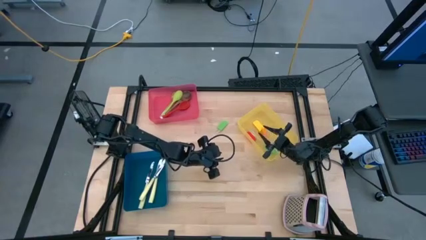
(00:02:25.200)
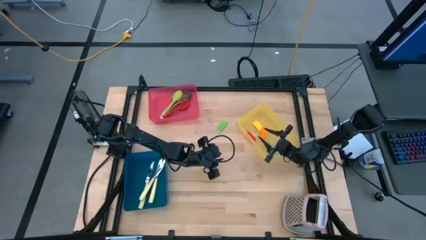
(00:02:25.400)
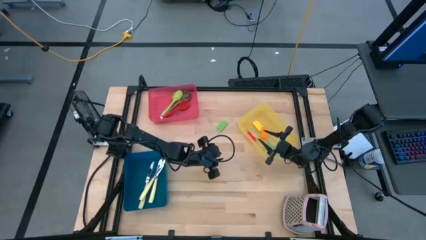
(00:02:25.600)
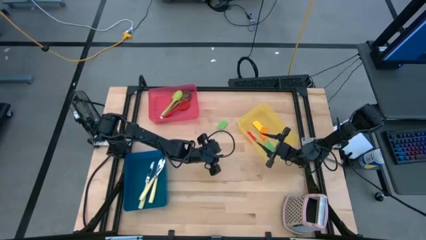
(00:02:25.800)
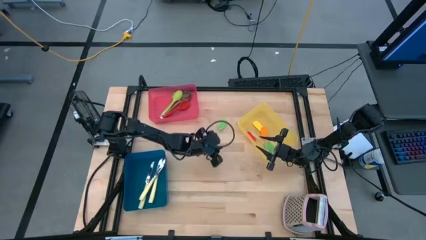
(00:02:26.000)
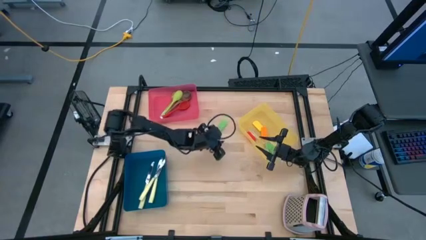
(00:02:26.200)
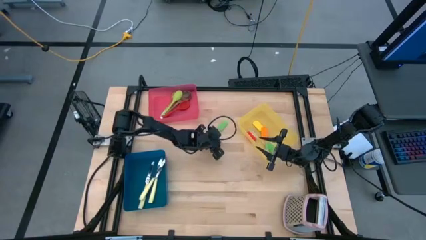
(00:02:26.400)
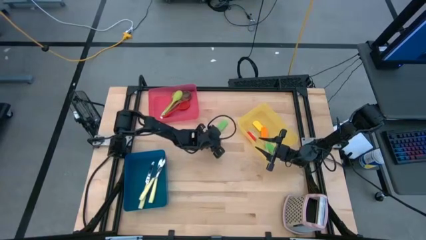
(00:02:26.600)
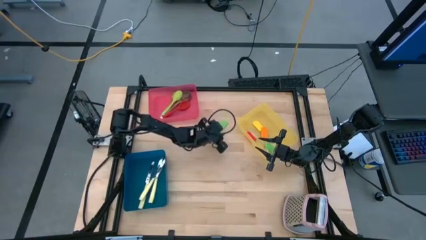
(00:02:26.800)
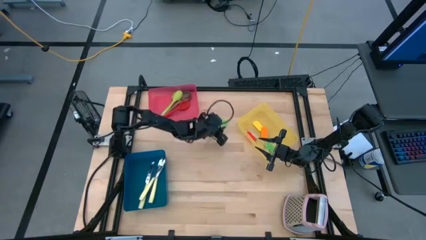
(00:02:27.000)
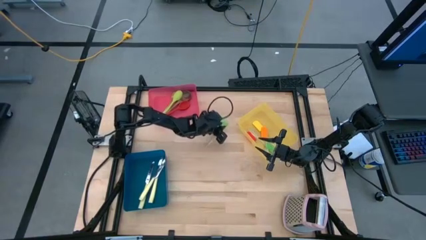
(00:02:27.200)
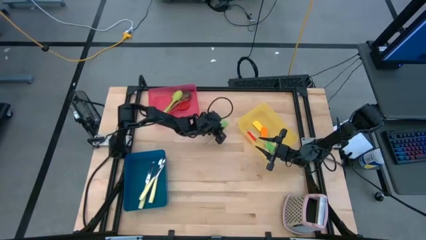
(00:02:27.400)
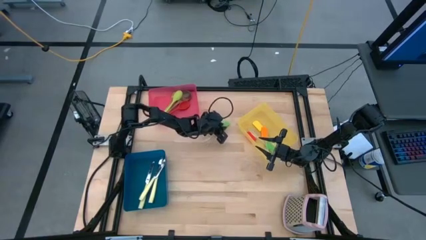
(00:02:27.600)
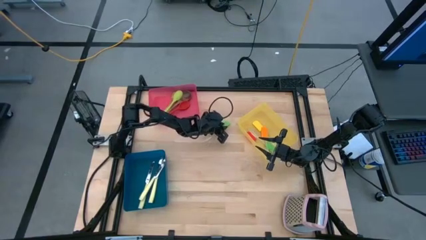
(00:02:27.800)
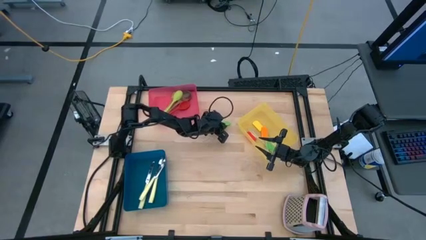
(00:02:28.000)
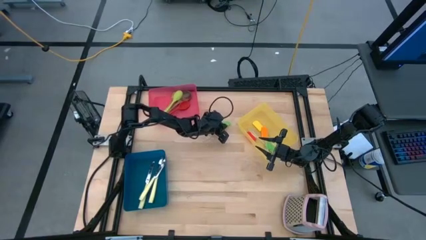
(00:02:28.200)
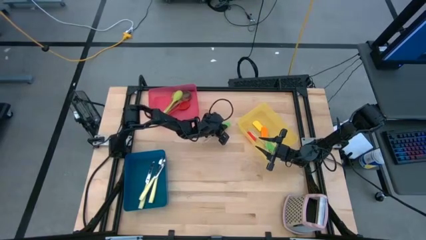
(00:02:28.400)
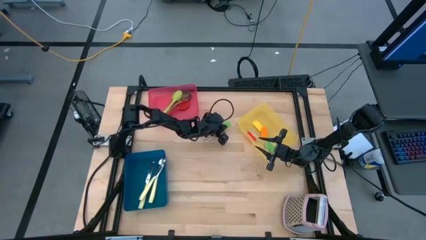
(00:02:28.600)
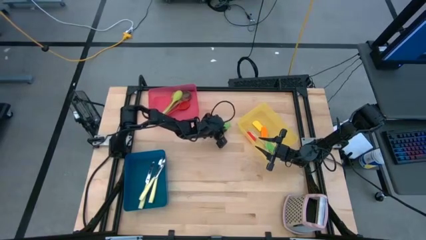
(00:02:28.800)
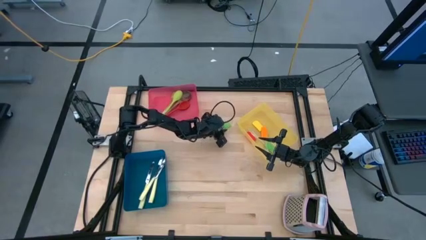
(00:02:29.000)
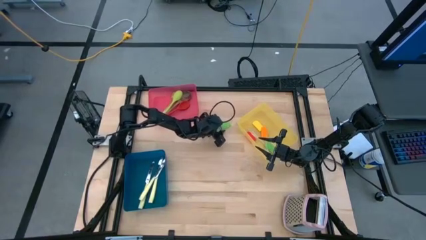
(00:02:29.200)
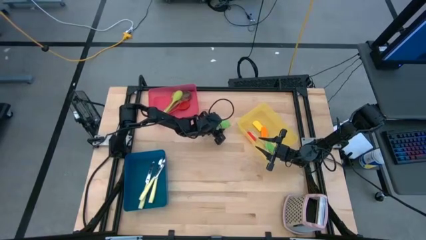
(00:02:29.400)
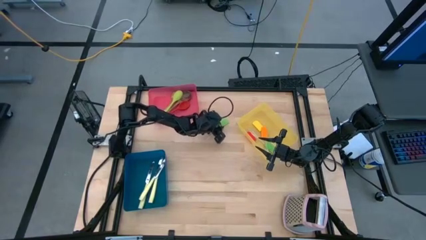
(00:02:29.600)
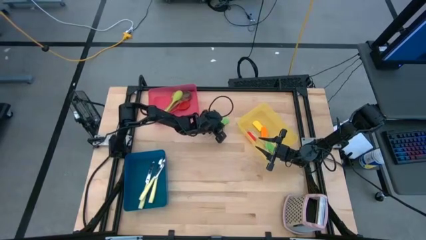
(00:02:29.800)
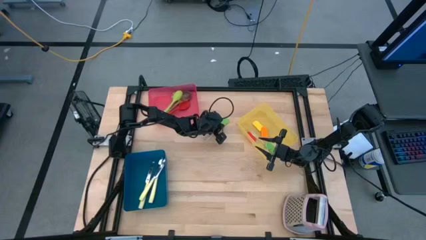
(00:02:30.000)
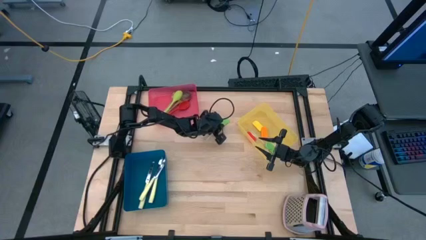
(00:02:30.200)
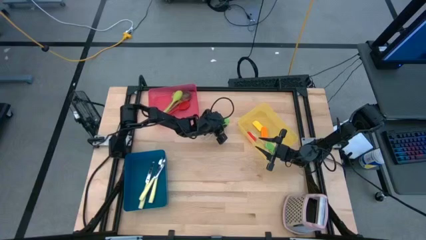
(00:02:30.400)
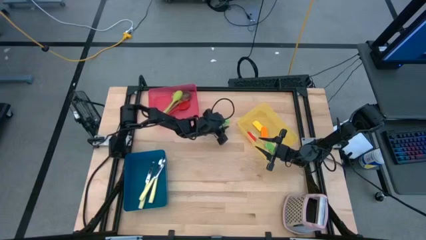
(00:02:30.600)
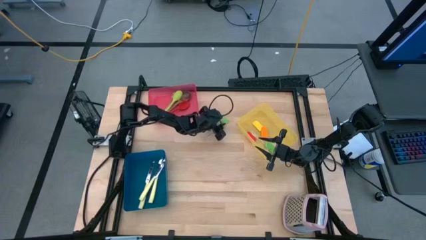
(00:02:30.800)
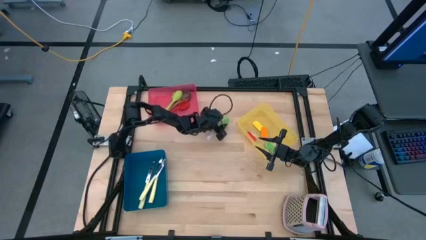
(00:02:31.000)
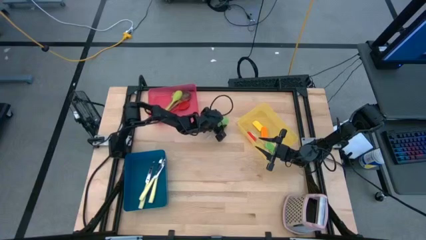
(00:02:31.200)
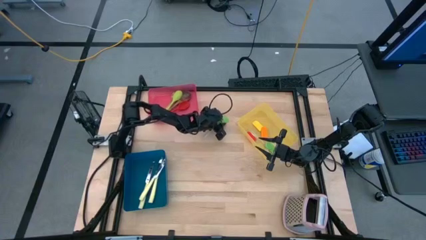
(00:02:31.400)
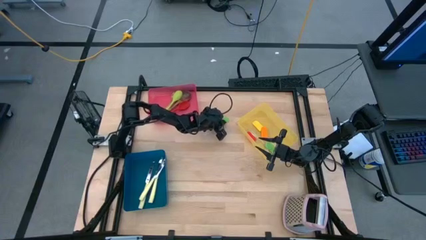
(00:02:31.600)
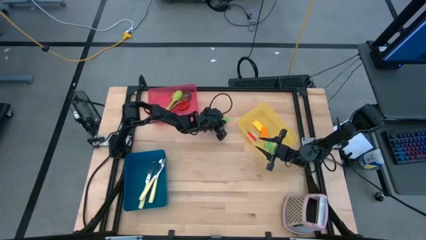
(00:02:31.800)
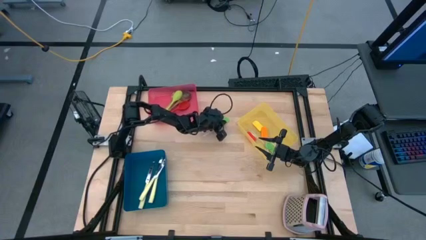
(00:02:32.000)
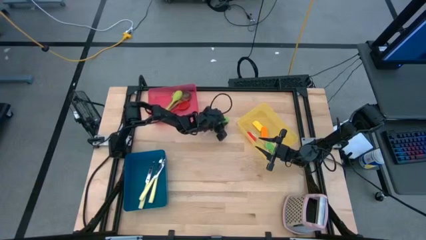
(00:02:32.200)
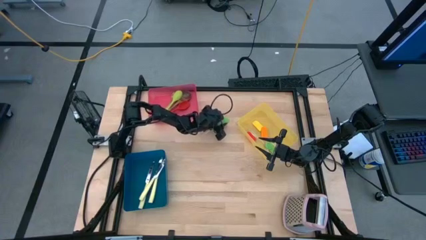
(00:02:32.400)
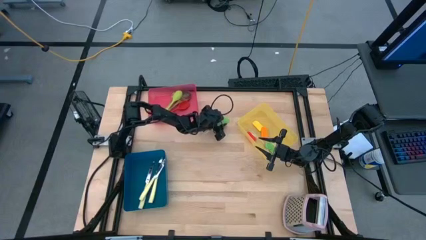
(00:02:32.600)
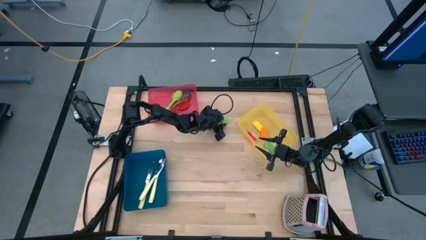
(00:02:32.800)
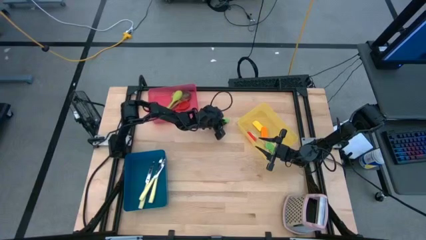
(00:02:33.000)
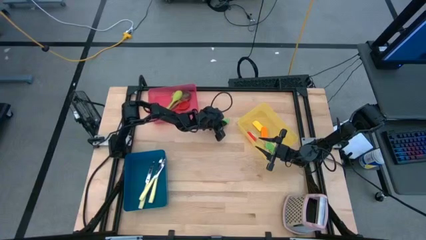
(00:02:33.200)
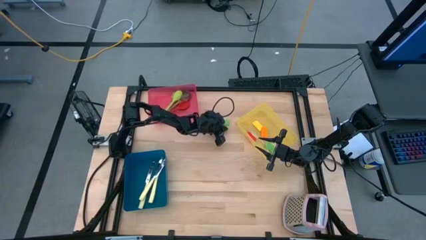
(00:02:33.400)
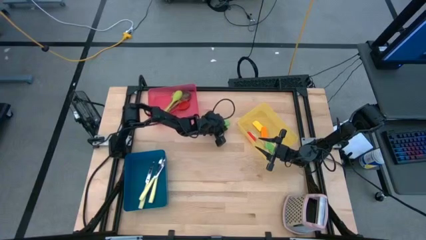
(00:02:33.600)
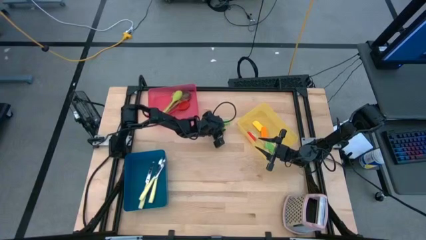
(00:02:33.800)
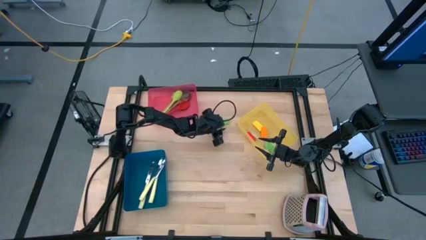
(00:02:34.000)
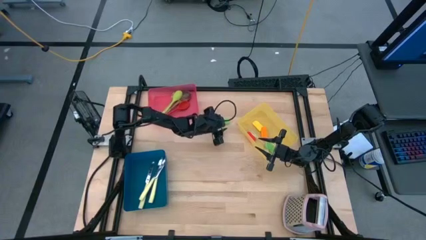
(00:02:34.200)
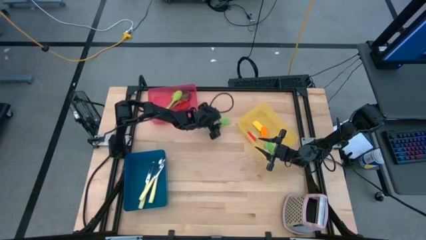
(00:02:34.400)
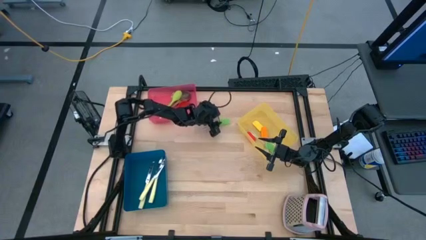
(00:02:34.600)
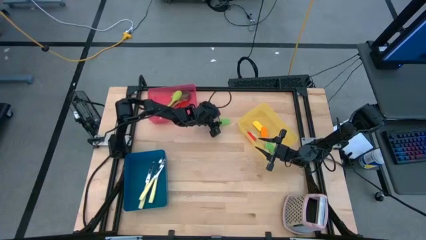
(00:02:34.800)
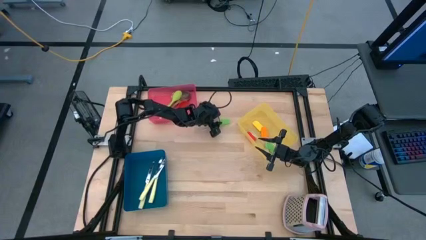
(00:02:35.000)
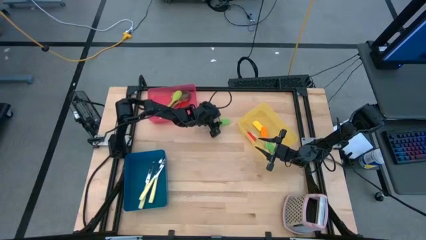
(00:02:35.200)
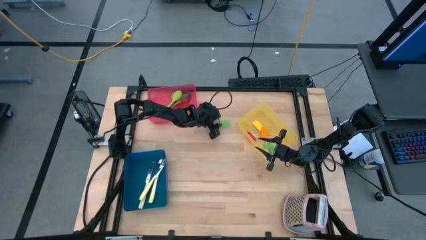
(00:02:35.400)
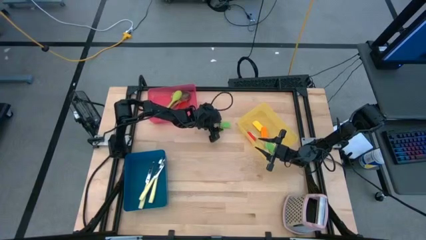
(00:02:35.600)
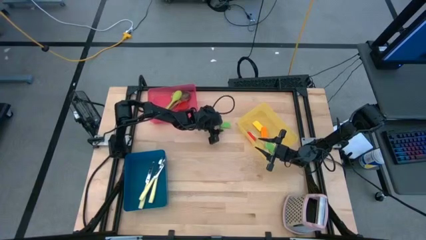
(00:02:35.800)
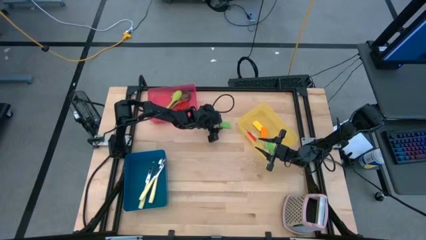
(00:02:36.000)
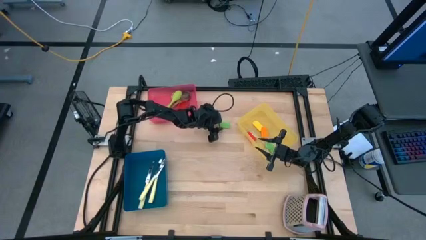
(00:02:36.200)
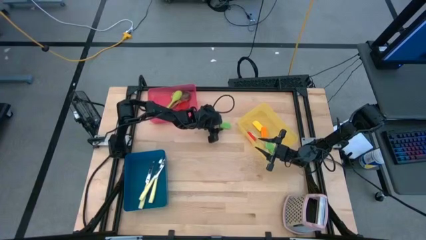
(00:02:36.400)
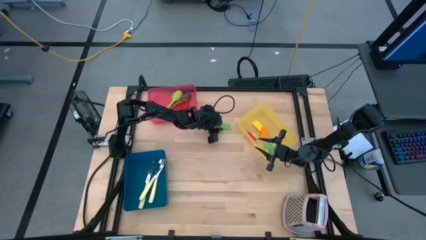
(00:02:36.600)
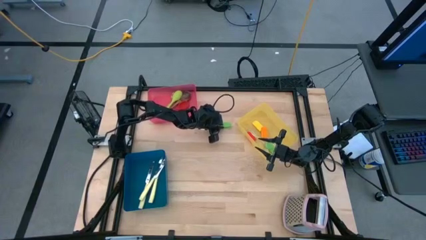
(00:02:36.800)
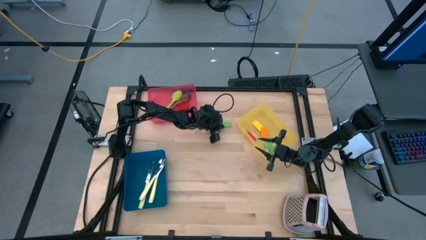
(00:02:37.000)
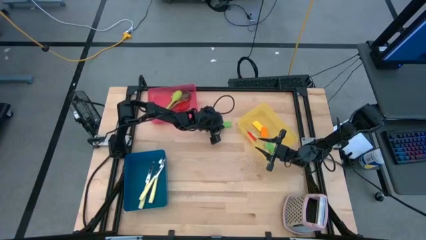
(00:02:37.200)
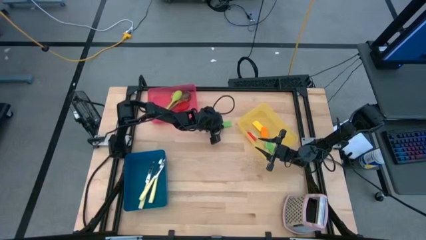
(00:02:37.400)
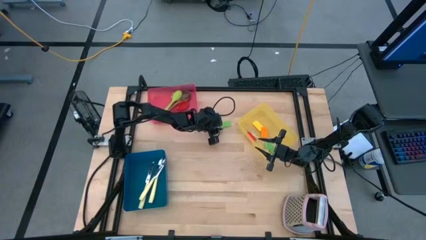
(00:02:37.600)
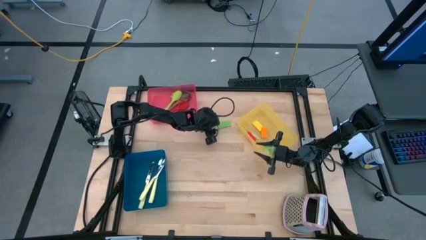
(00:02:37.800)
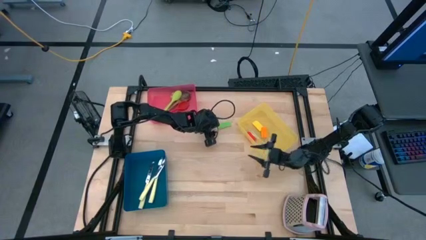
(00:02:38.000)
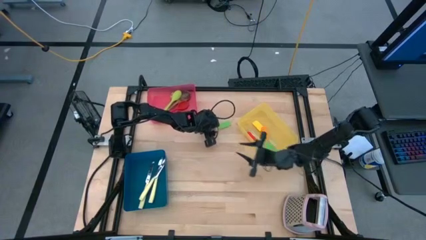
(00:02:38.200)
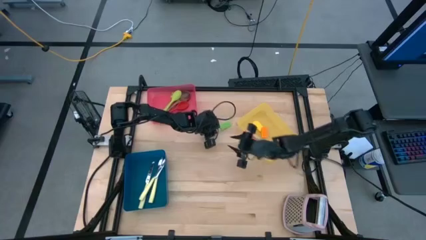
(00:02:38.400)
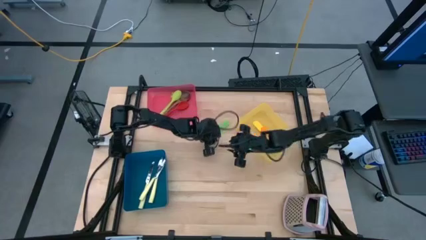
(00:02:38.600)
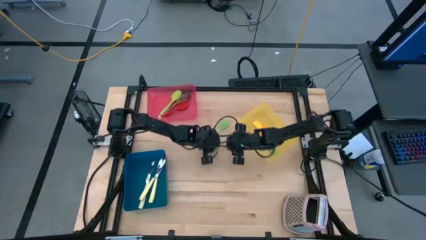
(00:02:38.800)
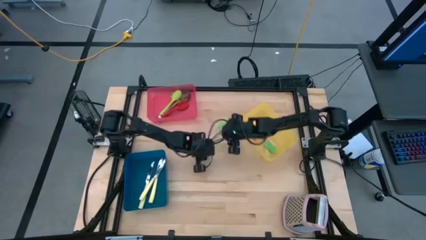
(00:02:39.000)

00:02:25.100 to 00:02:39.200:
Task: Pick & Place Kitchen Items
Put the green spatula into the yellow bin

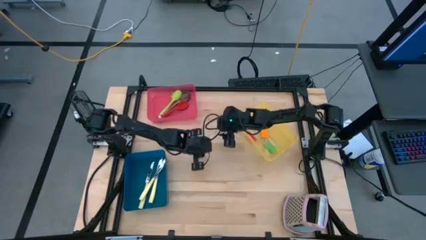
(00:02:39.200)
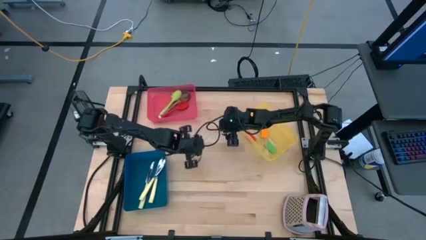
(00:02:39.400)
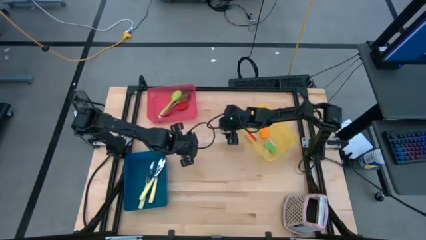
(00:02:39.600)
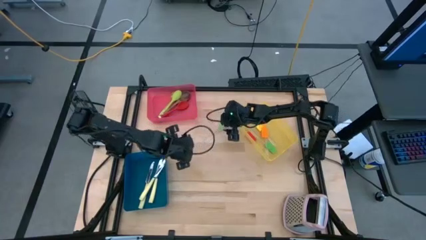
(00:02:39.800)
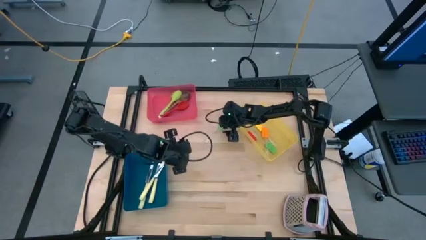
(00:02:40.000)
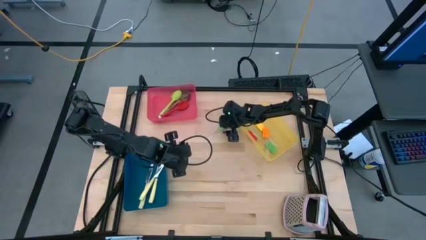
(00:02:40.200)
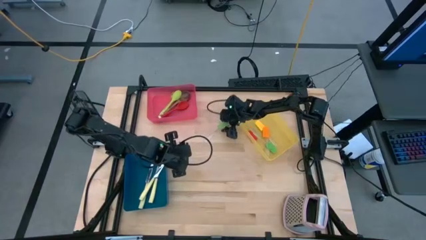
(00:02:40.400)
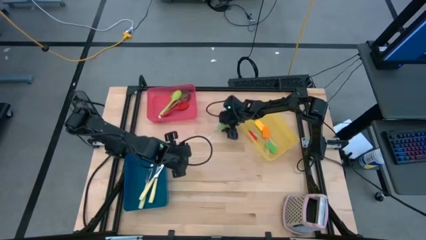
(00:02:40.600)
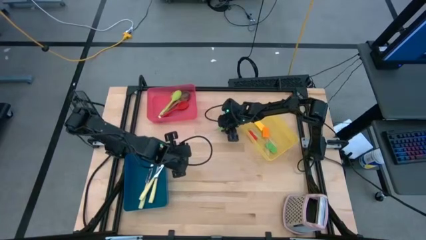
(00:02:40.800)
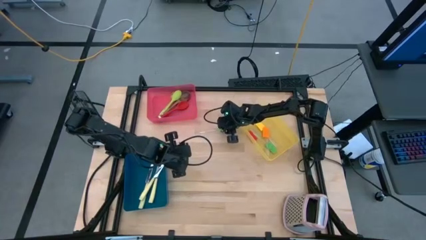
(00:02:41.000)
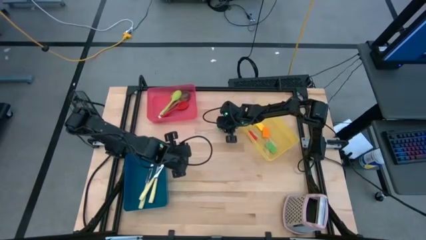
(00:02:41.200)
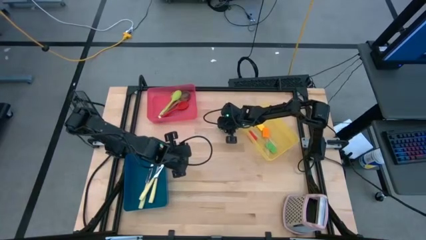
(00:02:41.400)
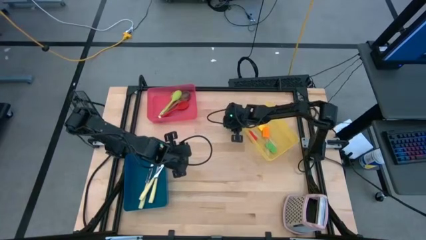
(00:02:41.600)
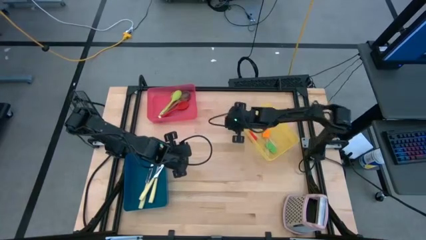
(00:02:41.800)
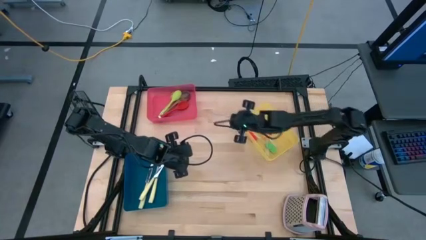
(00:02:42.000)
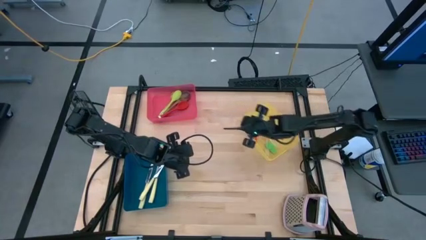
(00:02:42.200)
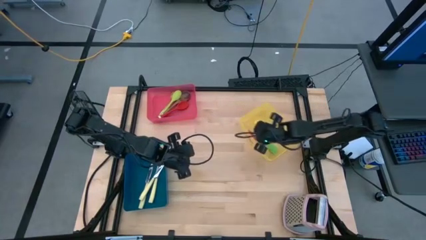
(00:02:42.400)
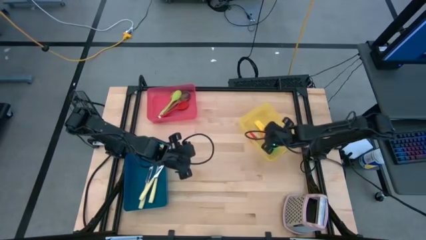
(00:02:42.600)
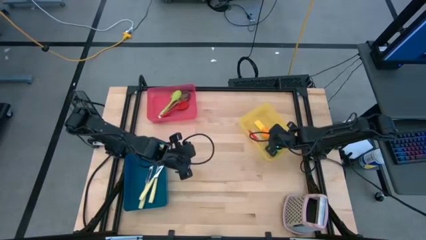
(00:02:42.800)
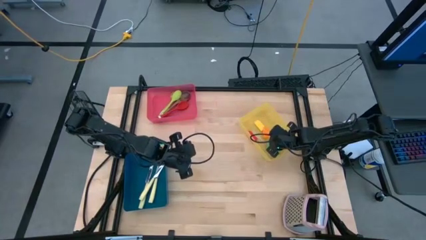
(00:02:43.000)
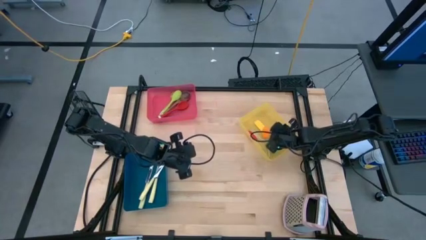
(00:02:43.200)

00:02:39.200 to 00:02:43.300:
Put the green spatula into the yellow bin
